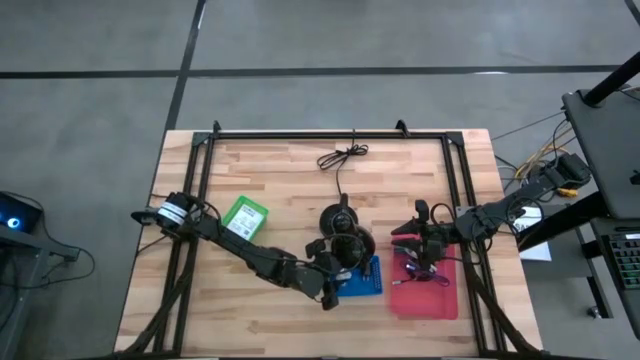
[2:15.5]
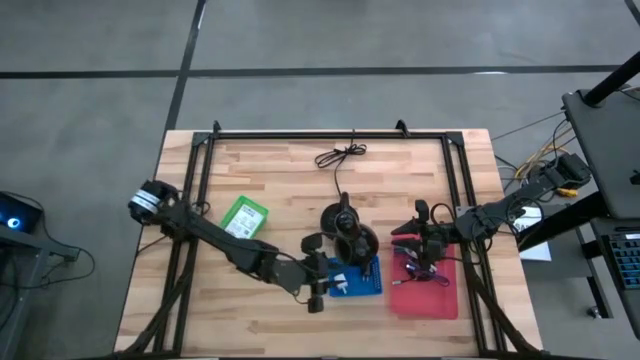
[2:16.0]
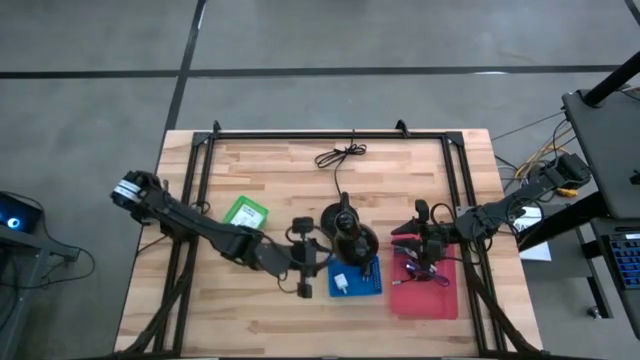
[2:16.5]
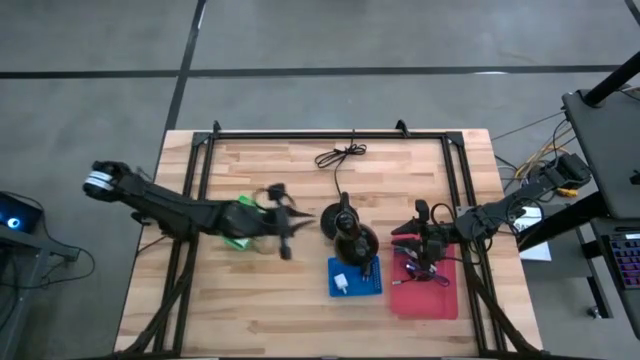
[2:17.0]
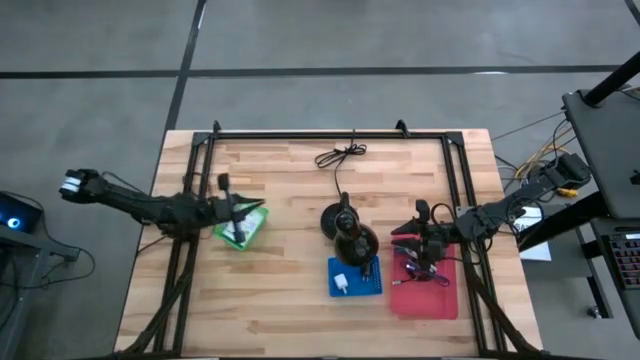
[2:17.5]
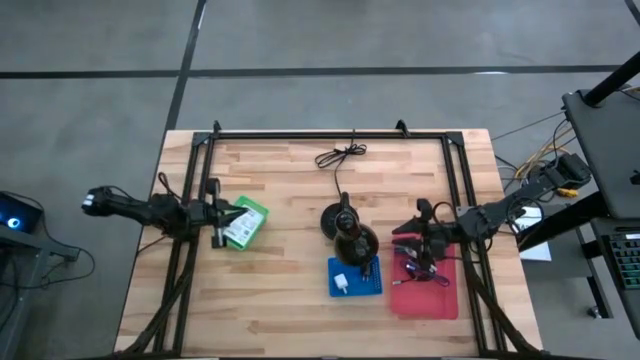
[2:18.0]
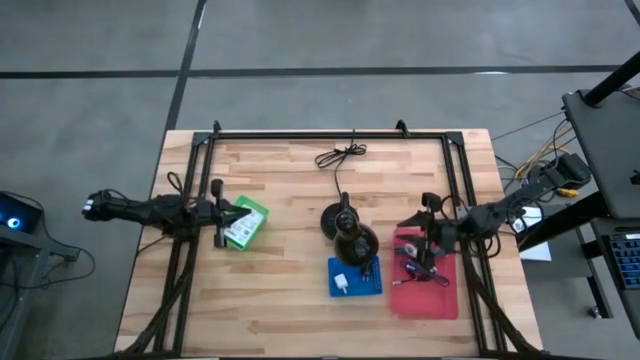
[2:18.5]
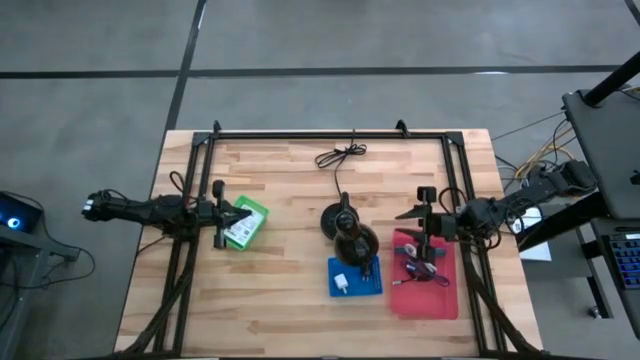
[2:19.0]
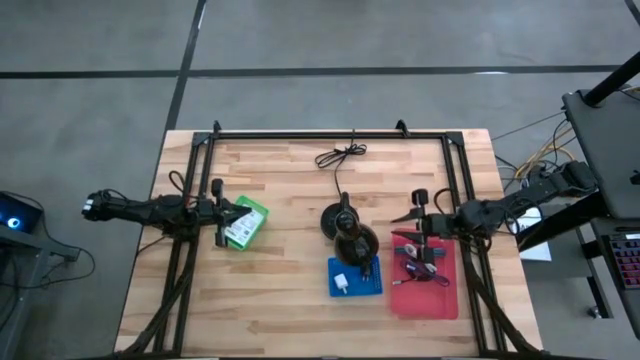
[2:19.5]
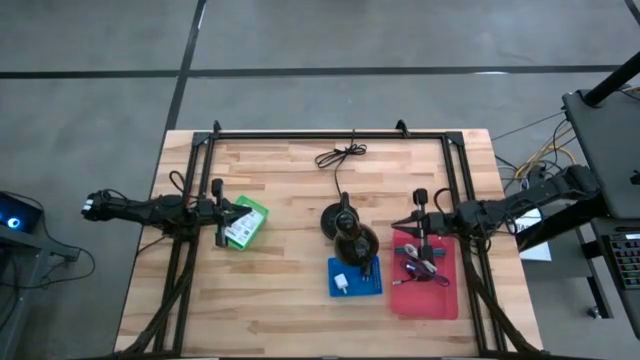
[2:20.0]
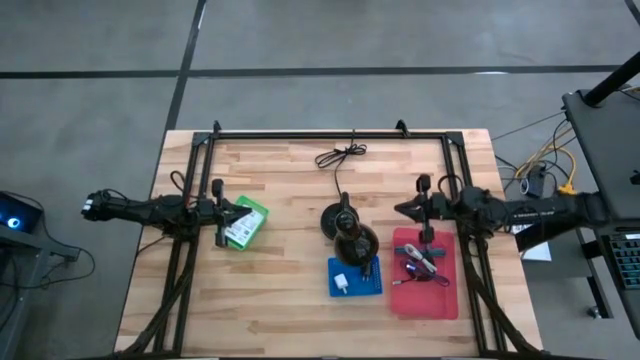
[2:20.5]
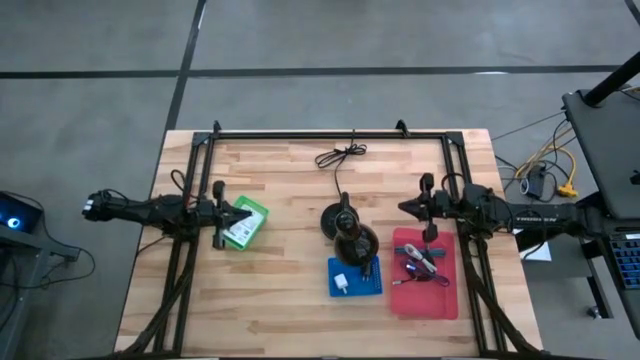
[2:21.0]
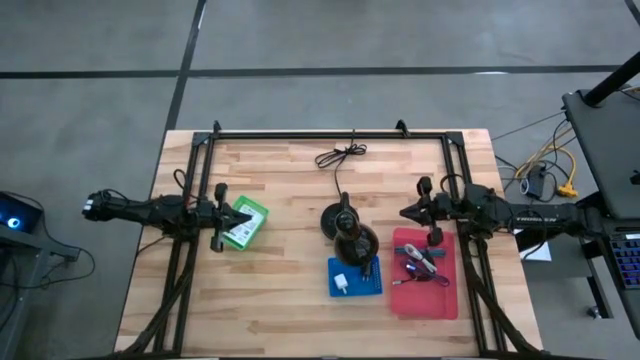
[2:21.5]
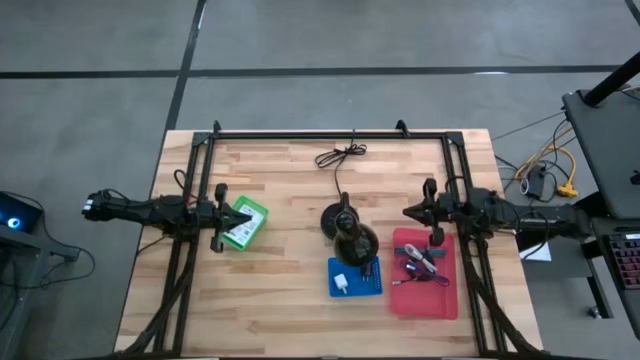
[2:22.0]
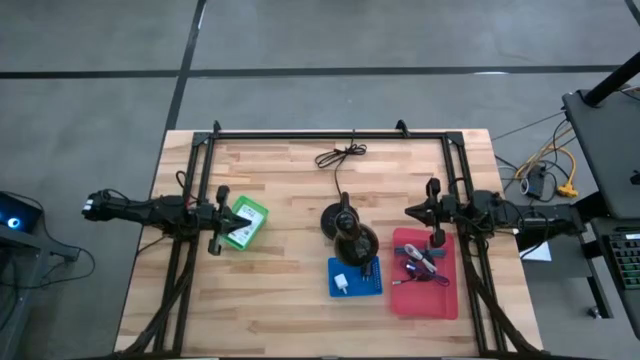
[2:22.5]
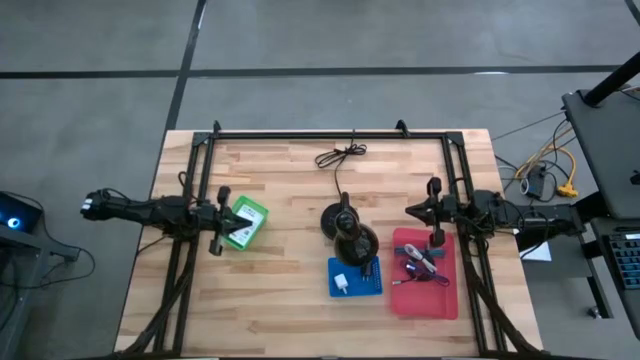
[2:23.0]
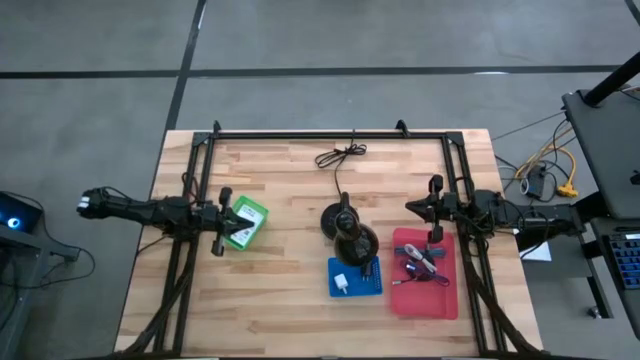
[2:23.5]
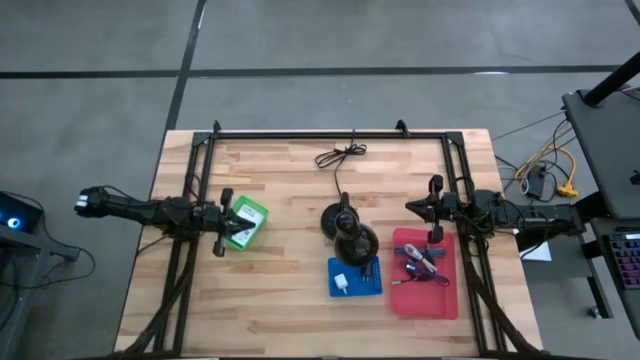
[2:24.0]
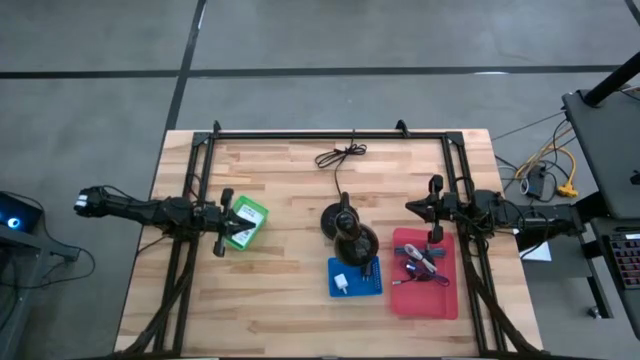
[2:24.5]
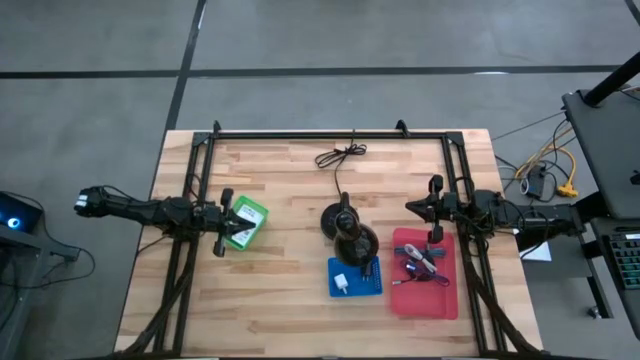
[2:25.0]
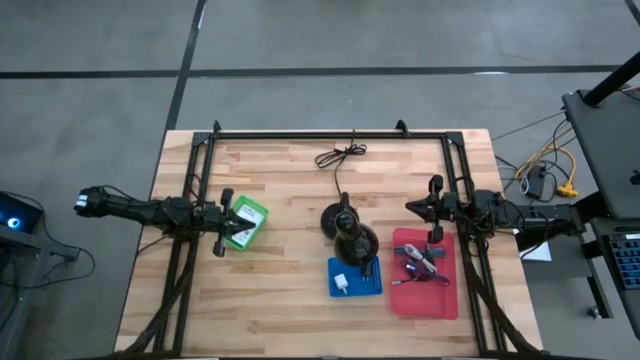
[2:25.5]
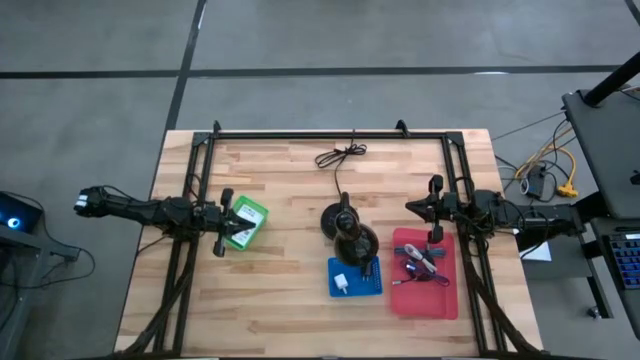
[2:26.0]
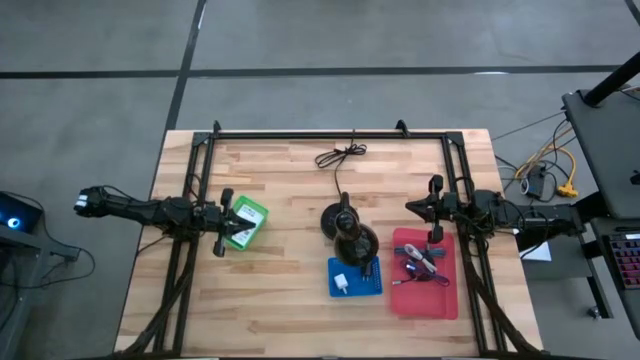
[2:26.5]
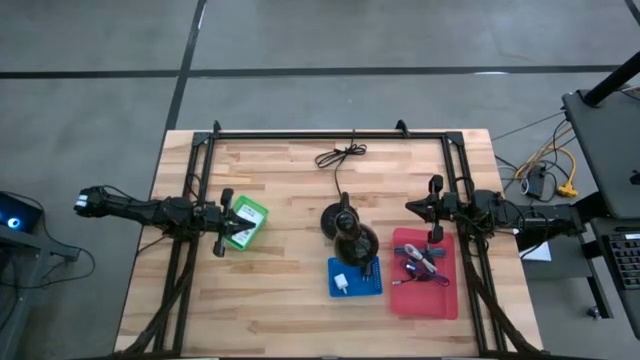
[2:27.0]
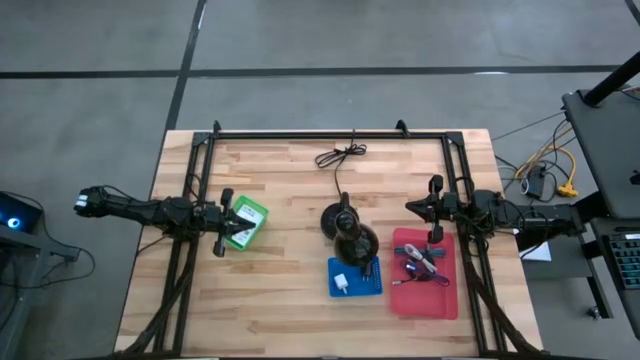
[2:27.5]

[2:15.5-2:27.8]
Task: Pick and place items into bin
Return to Home Position

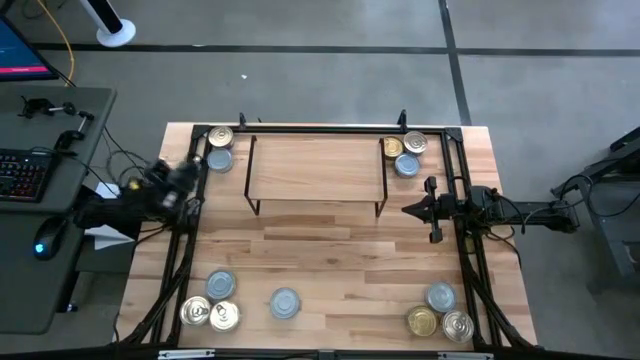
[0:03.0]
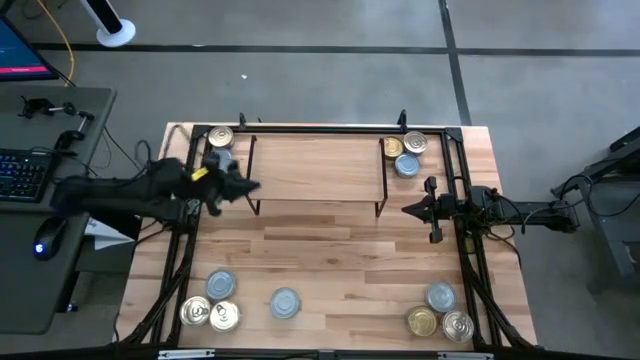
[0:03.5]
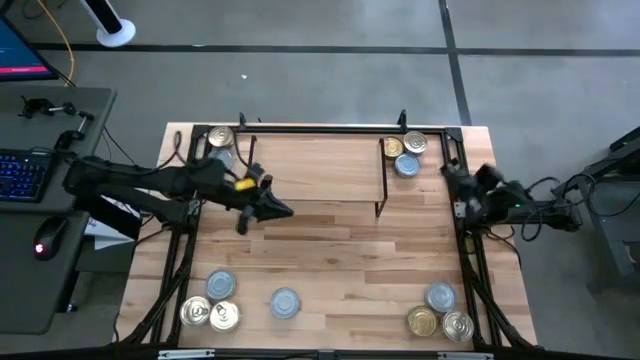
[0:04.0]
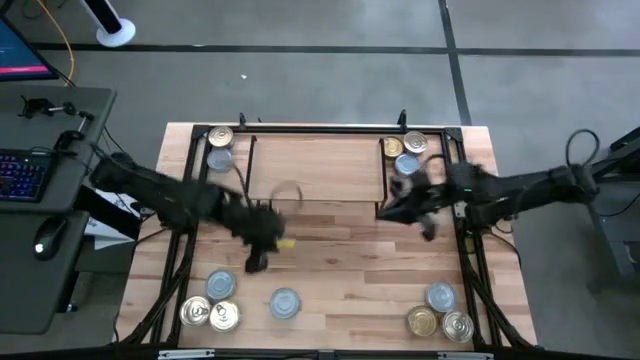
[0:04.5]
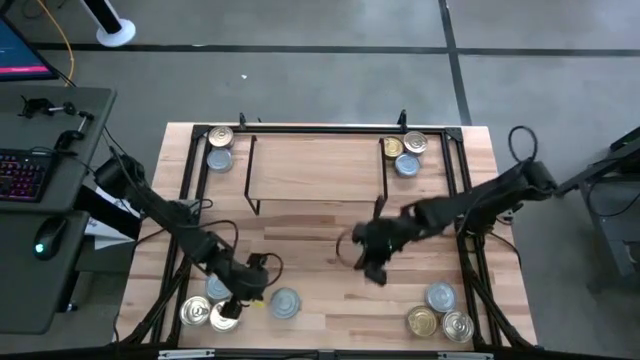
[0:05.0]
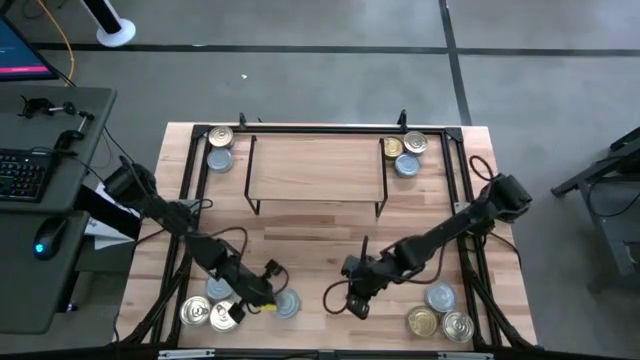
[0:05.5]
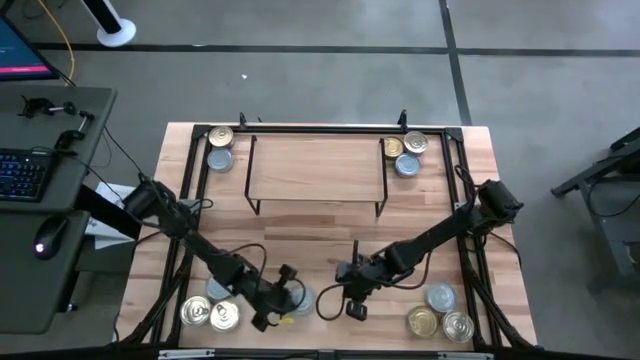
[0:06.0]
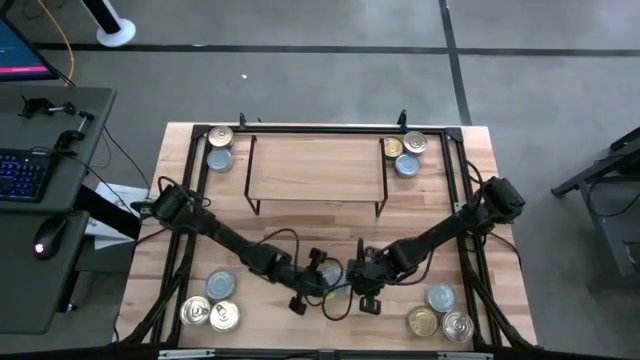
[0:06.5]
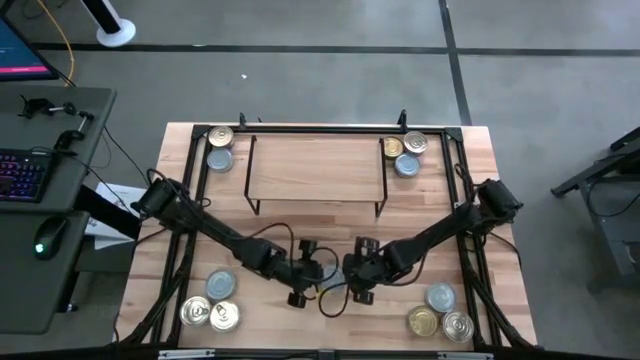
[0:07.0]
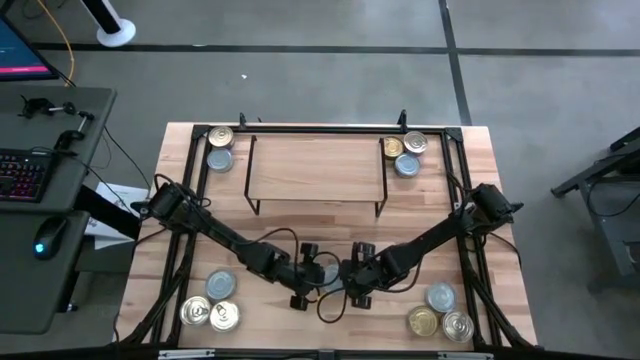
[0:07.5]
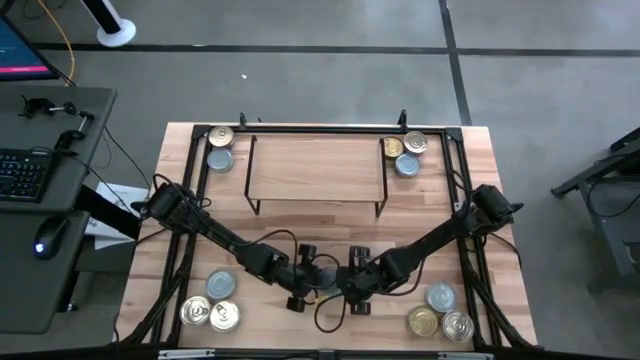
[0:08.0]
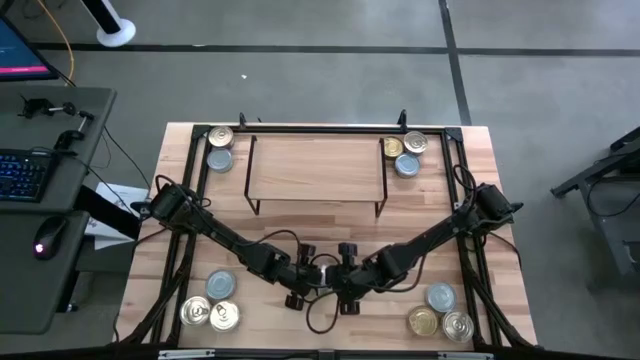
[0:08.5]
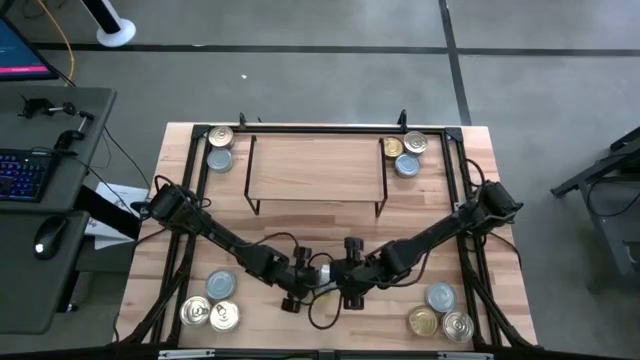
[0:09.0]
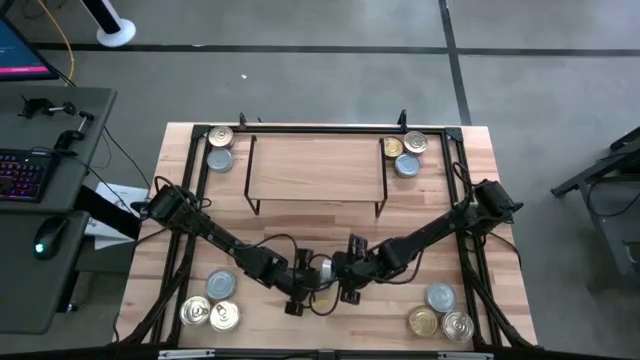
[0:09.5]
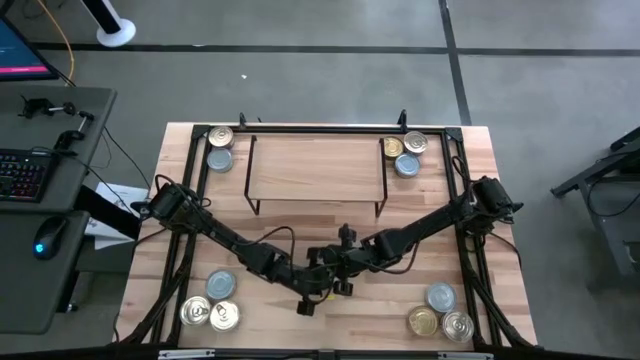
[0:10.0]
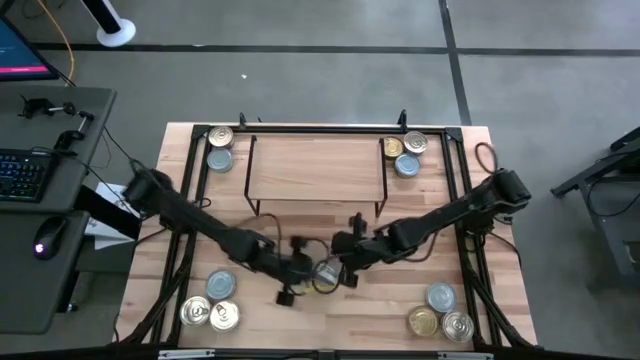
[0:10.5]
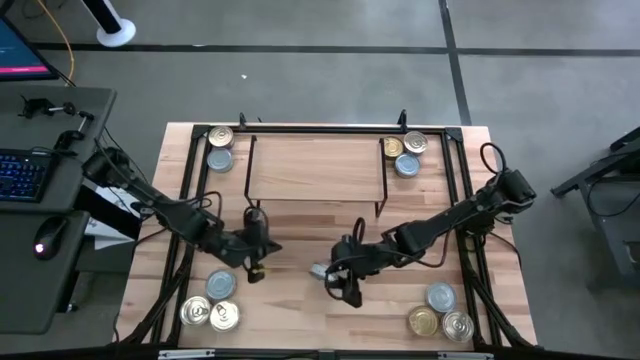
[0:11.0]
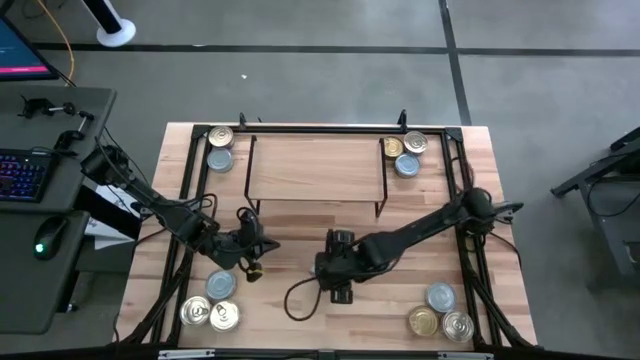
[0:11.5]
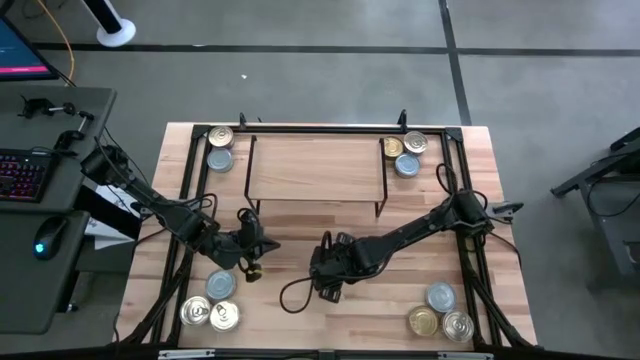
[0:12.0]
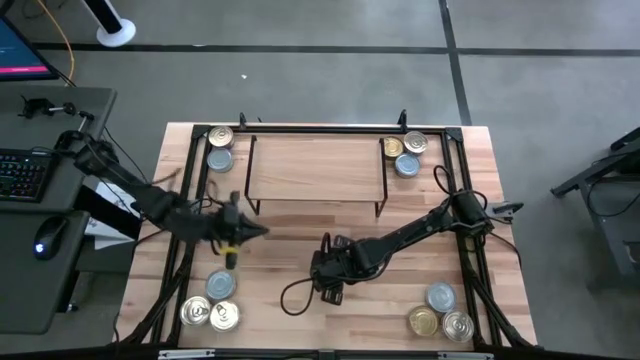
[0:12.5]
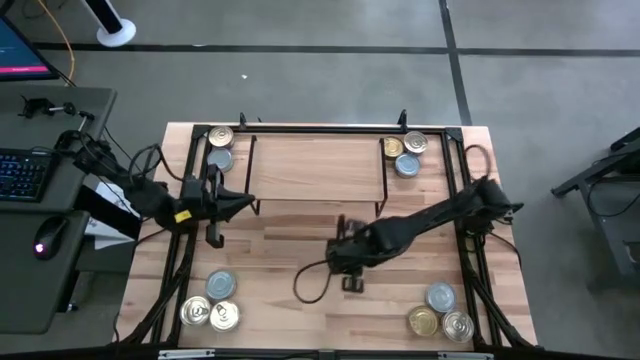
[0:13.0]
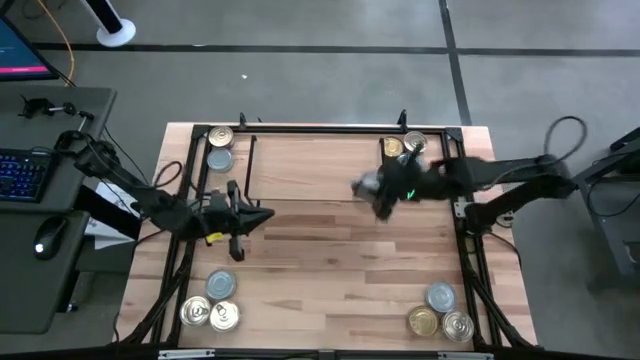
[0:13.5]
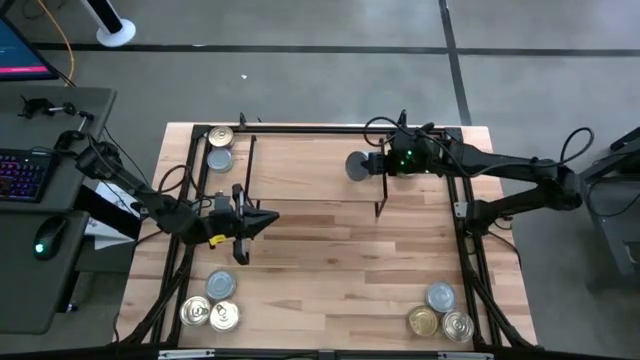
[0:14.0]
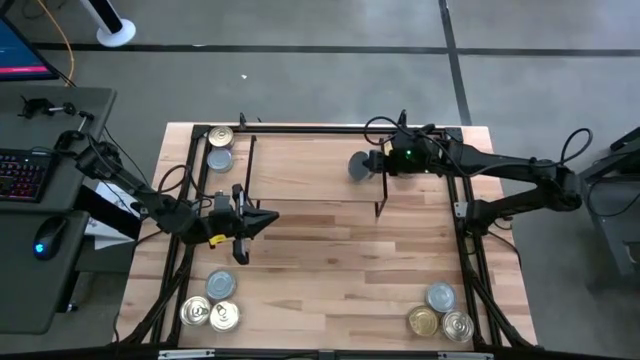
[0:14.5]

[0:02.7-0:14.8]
Task: Stack canned seafood by type on shelf
Put the green white tuna can on the shelf
